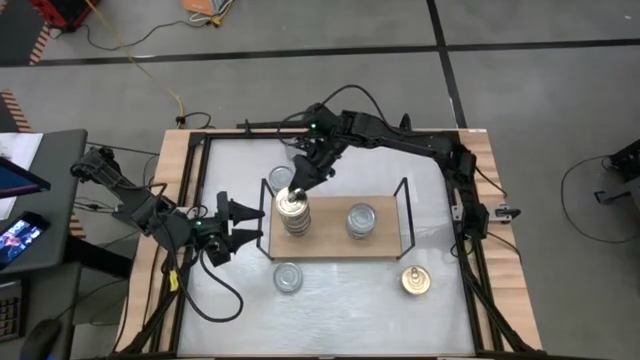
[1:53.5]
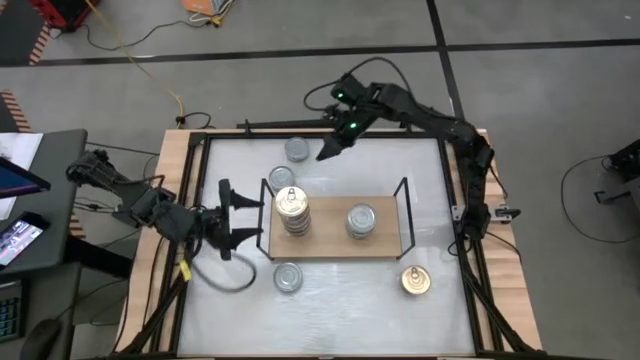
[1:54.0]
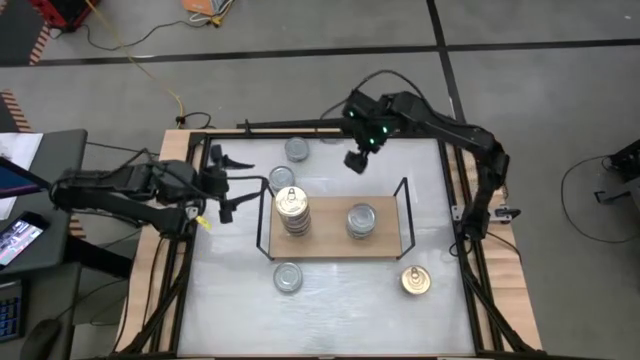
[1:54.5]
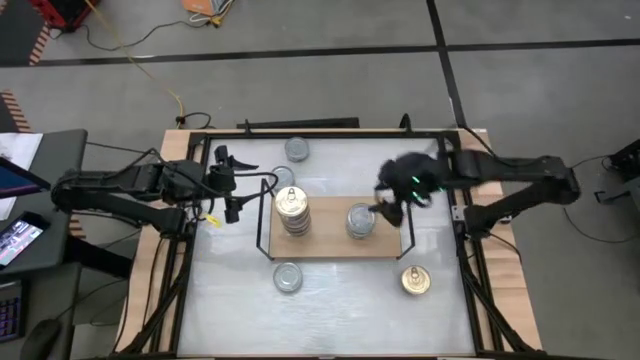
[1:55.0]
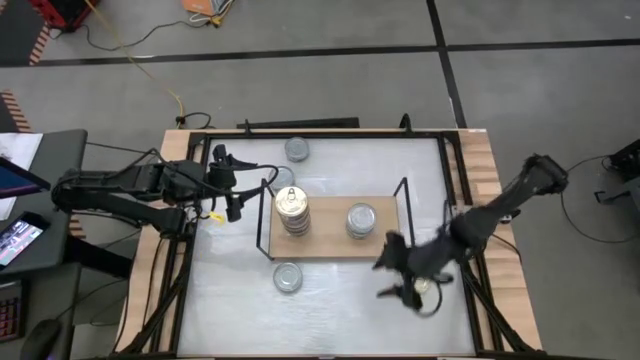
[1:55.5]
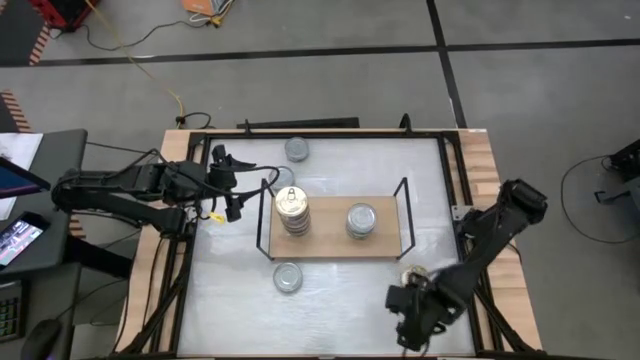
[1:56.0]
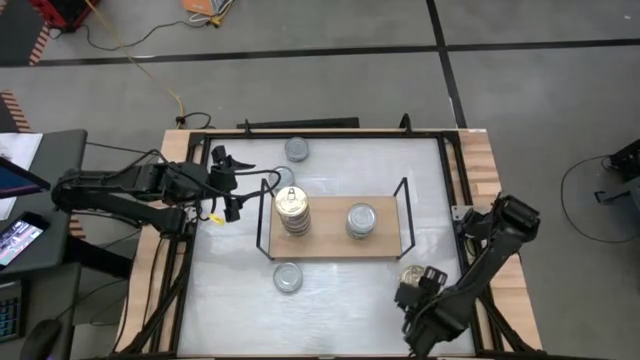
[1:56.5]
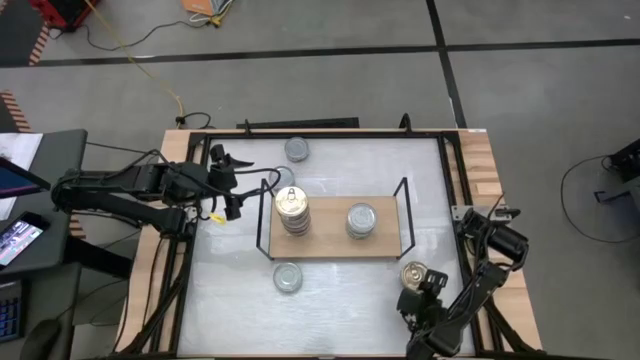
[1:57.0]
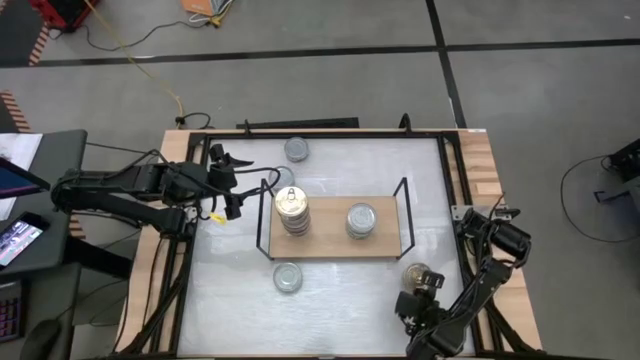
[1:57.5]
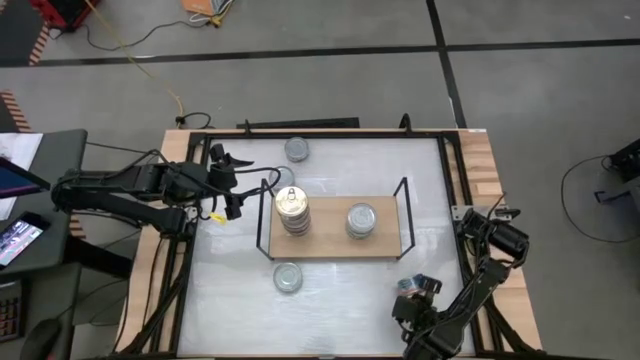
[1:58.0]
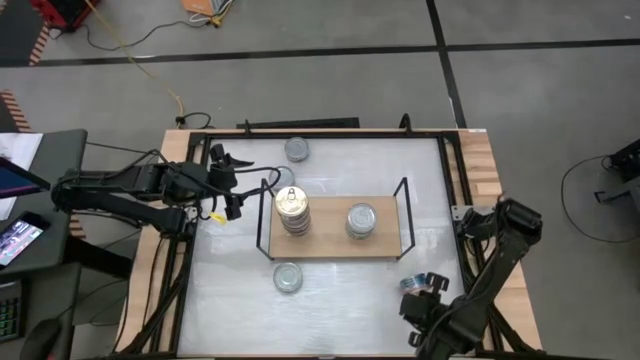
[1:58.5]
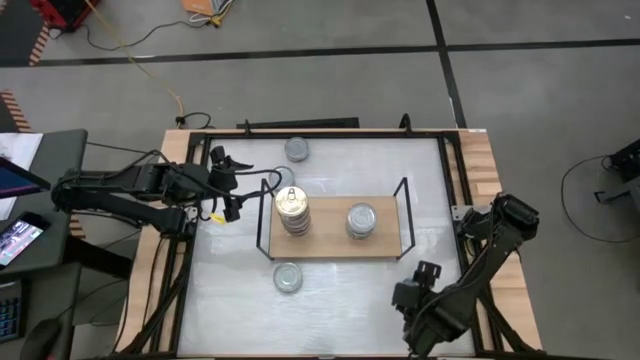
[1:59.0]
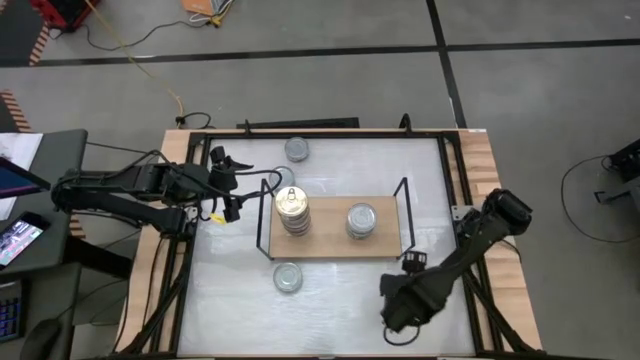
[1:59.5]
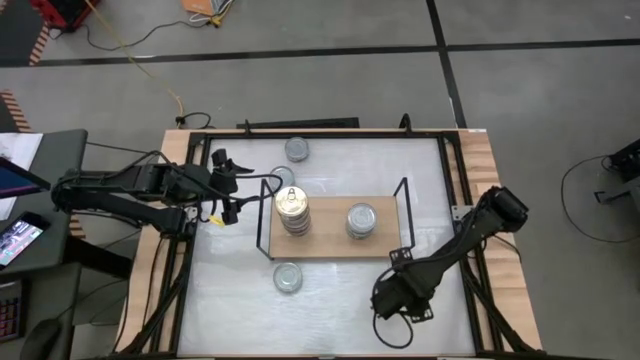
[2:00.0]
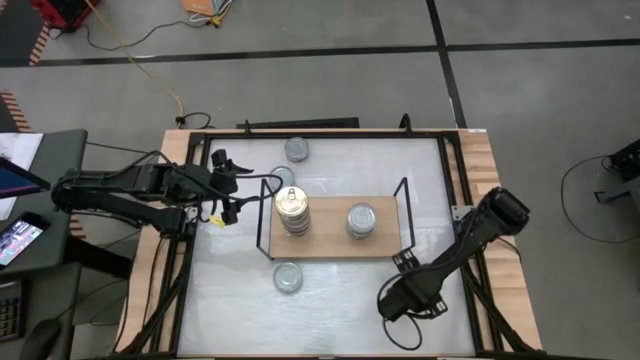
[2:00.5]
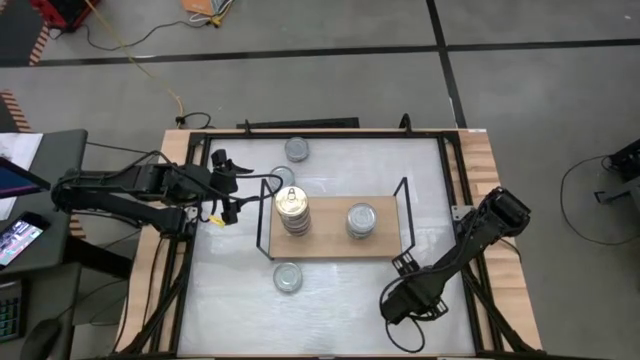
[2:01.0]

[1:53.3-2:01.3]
Task: Stack canned seafood by type on shelf
Stack the blue tuna can on top of the blue tuna can on the shelf

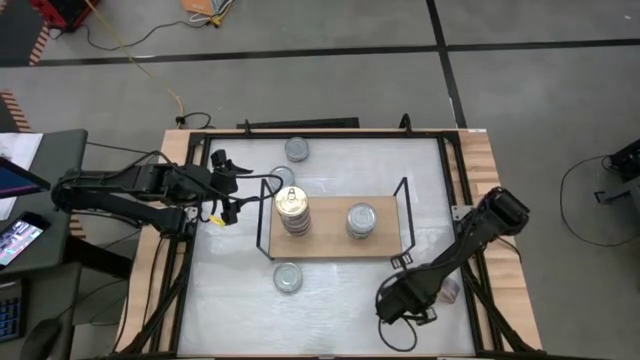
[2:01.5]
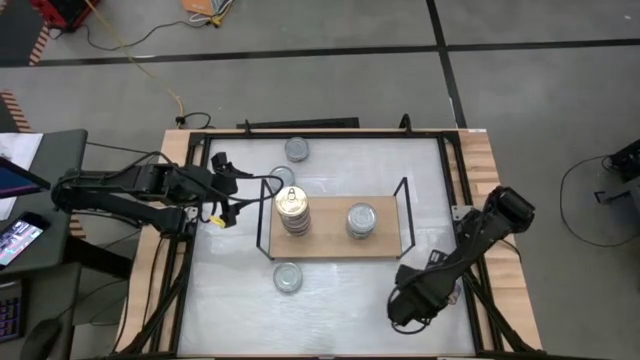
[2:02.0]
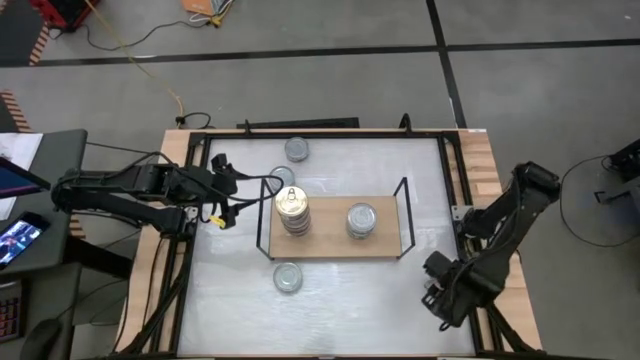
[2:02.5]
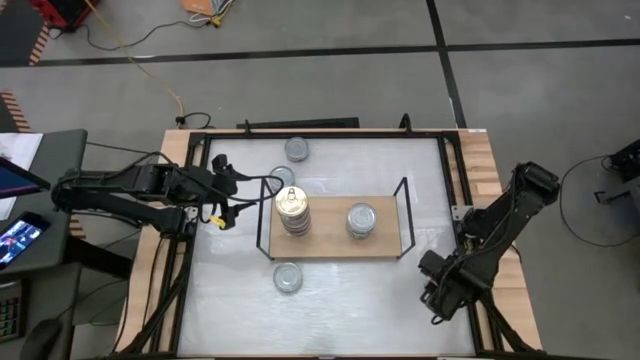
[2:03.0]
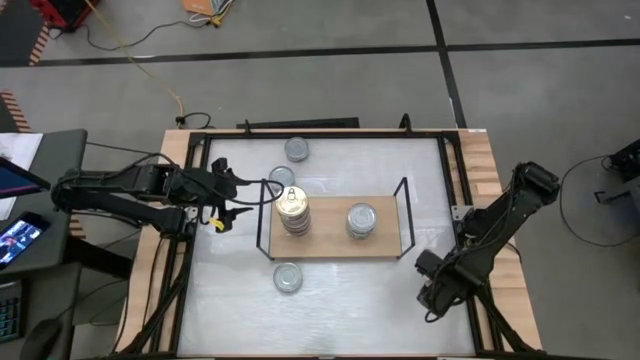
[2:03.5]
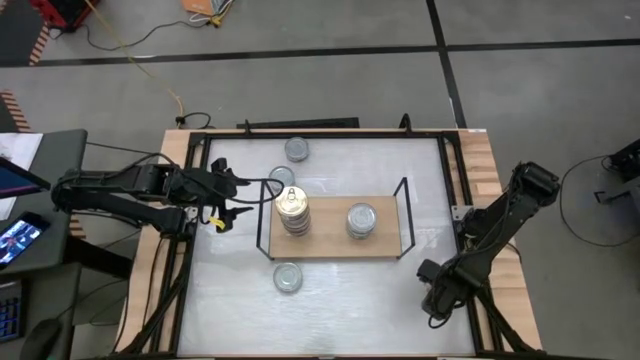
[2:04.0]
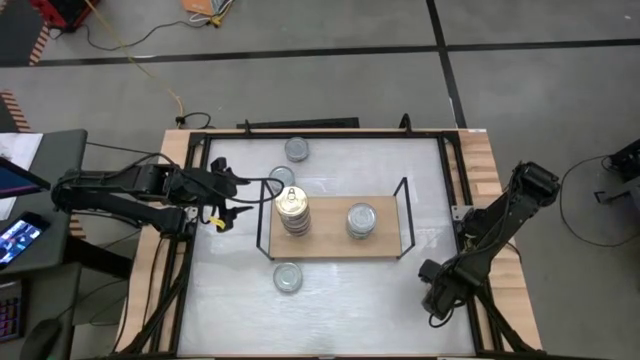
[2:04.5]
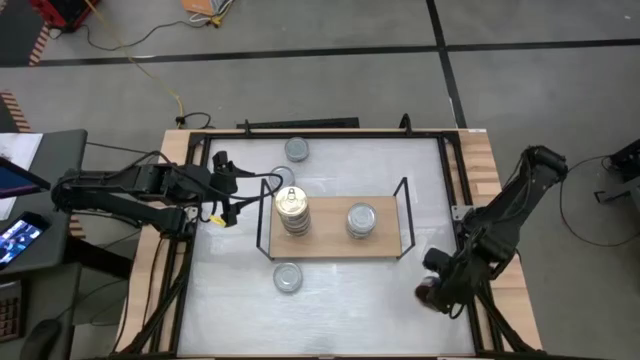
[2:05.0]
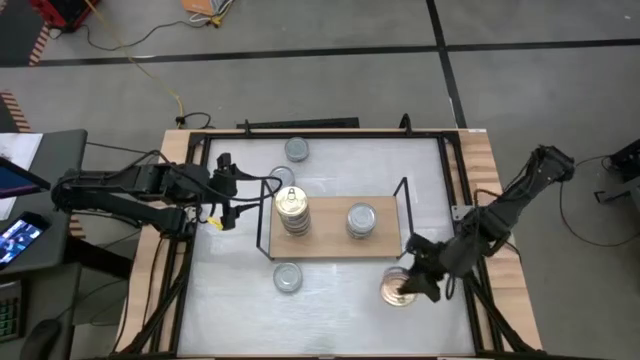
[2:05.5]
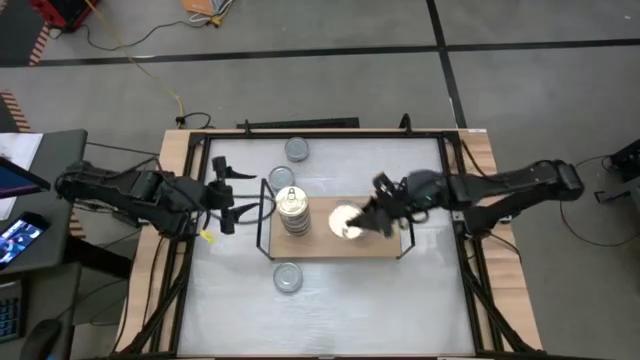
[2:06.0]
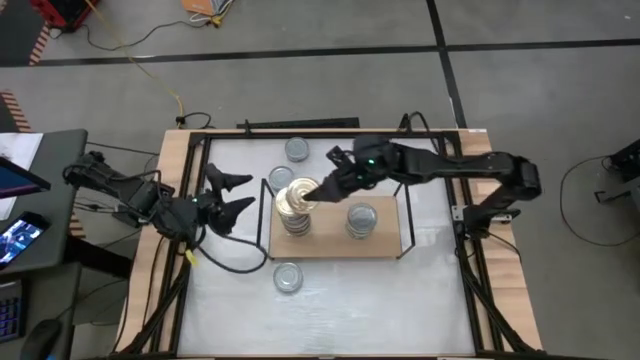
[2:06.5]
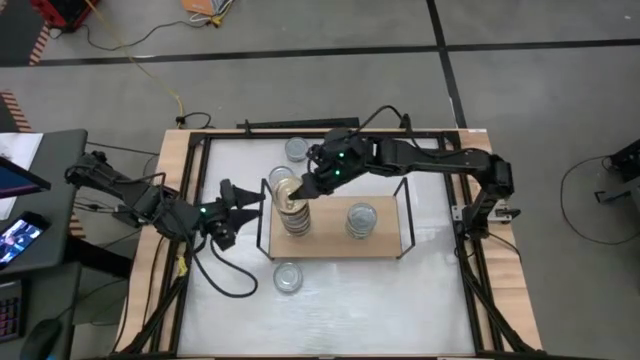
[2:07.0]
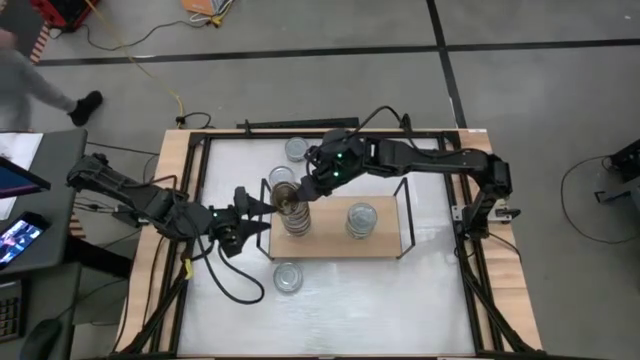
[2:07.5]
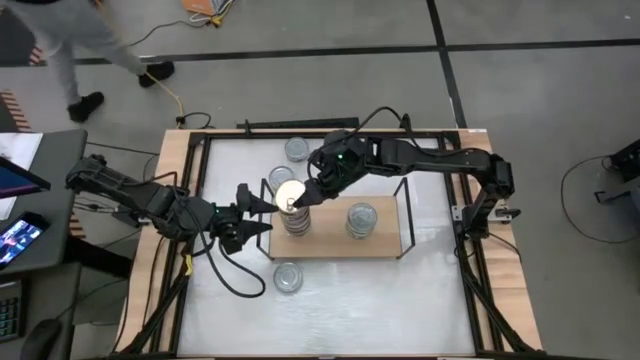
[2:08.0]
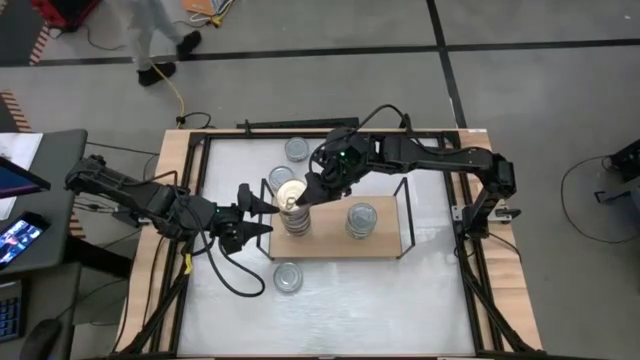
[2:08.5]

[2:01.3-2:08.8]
Stack the blue tuna can on top of the blue tuna can on the shelf

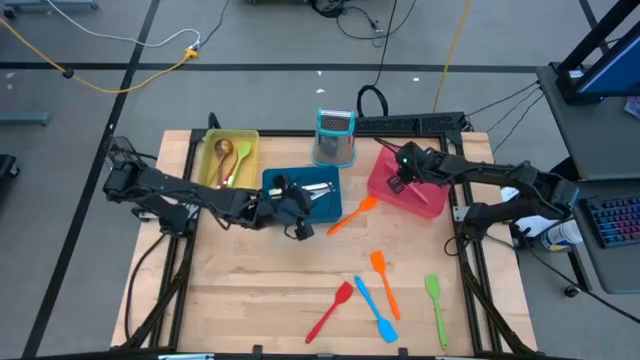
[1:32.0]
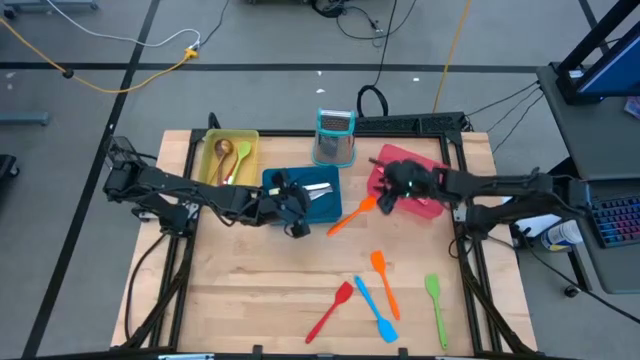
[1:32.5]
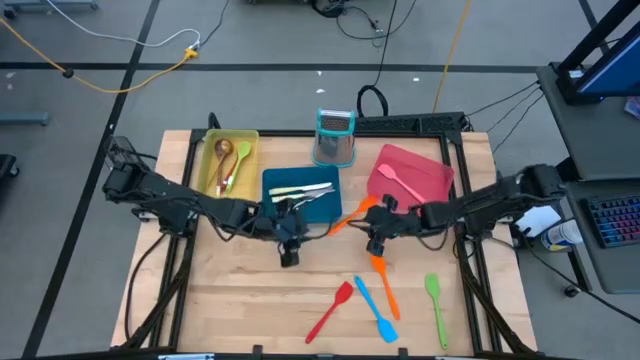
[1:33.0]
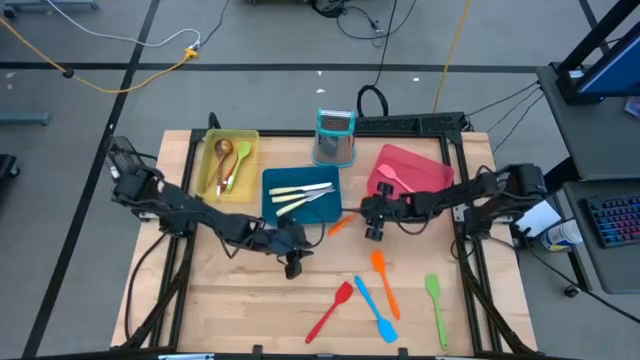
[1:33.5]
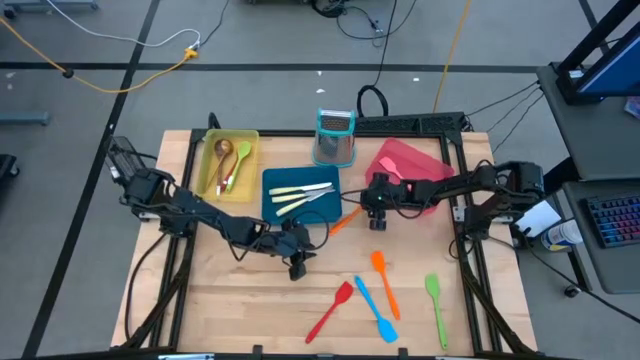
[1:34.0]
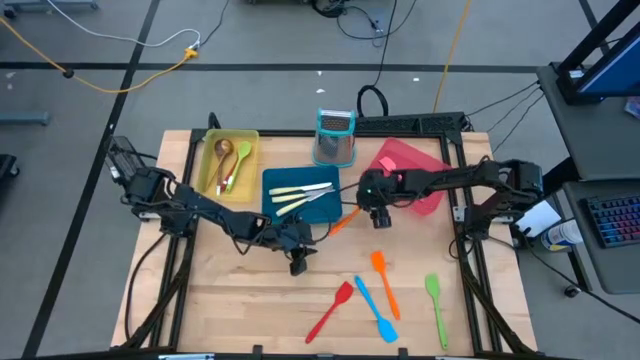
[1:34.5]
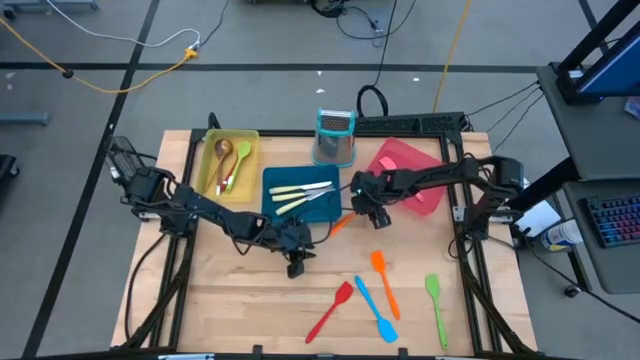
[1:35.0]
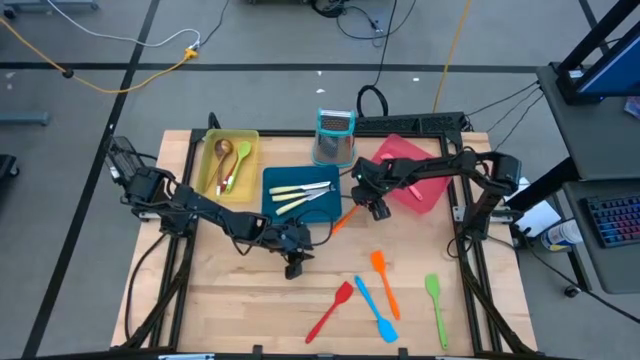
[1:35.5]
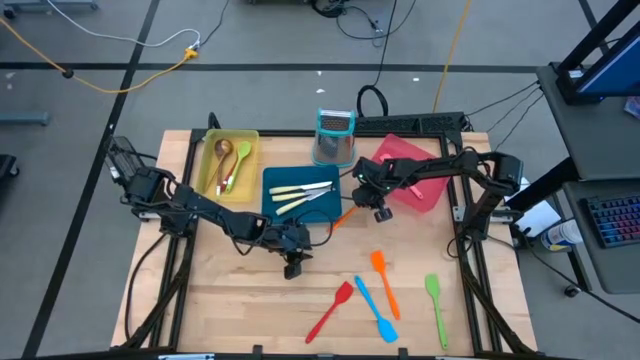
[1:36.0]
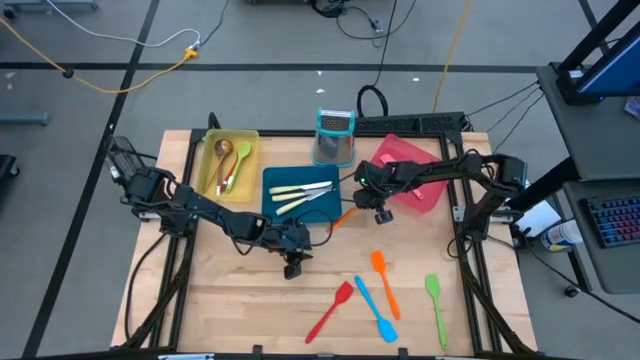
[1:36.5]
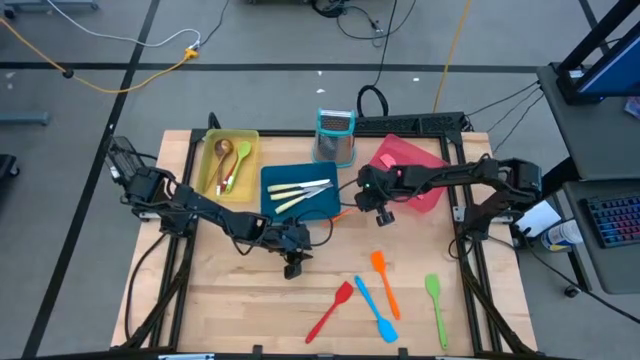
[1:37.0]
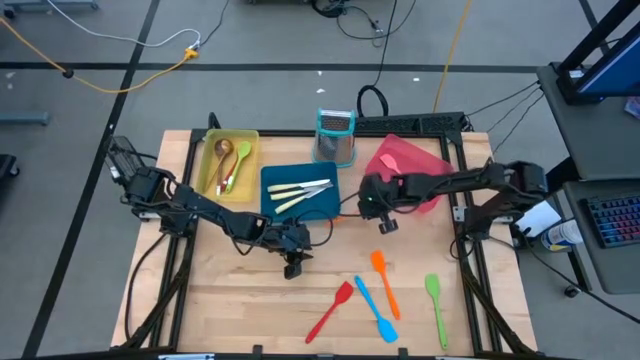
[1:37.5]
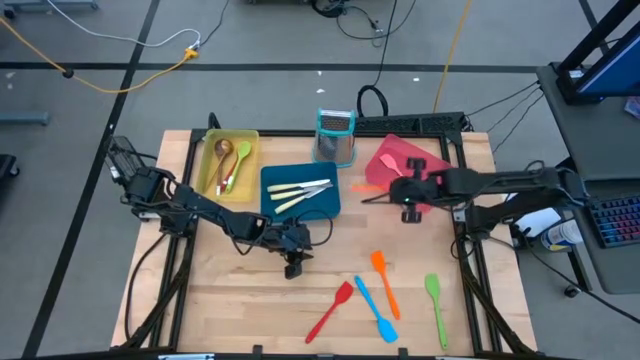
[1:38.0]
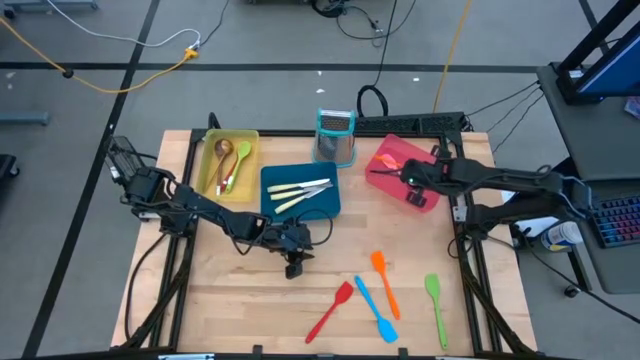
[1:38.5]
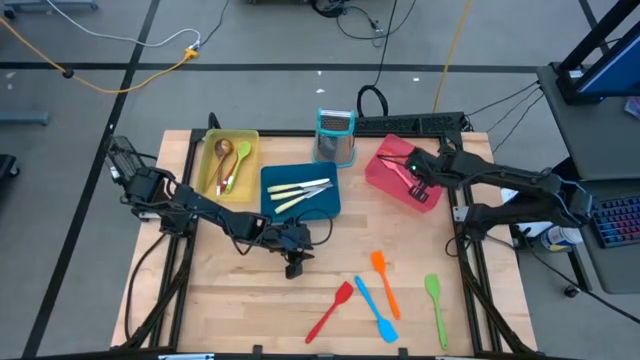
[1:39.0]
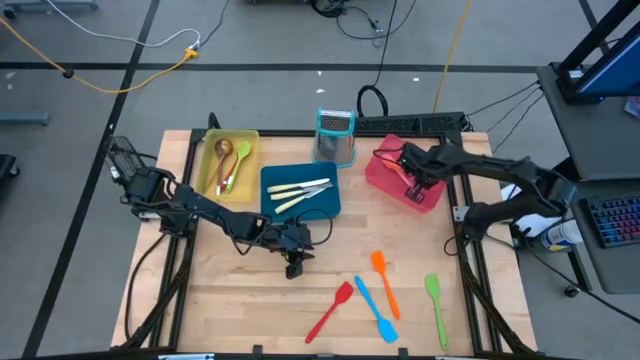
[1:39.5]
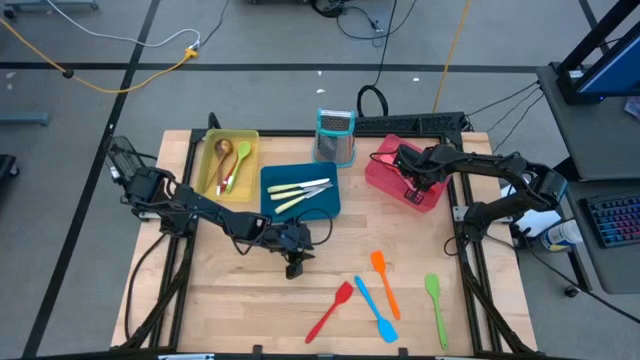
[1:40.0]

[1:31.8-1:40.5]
Task: Pick & Place Kitchen Items
Put the top orange spatula into the red bin
